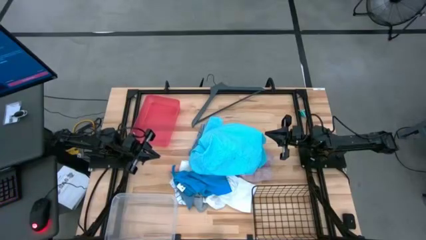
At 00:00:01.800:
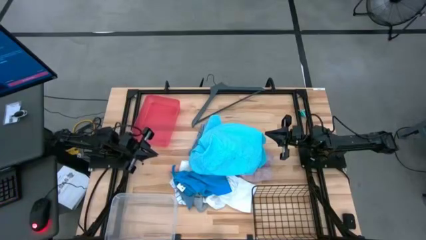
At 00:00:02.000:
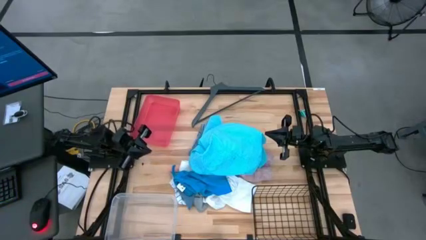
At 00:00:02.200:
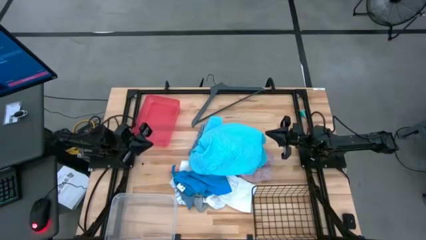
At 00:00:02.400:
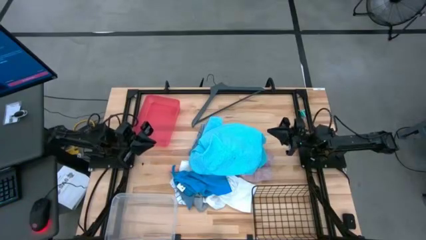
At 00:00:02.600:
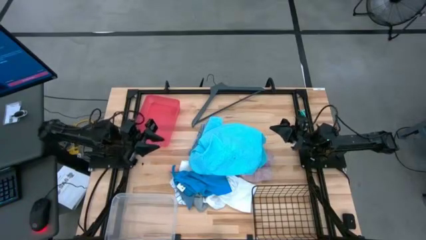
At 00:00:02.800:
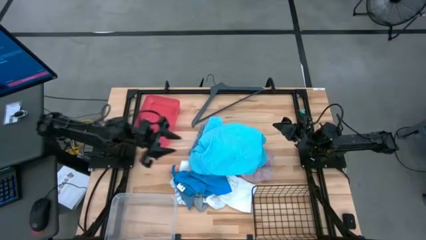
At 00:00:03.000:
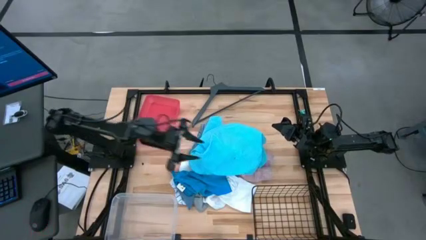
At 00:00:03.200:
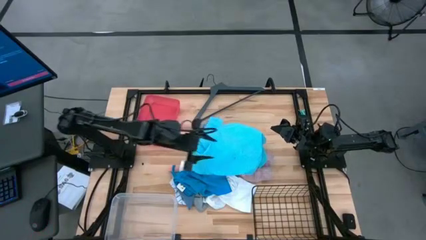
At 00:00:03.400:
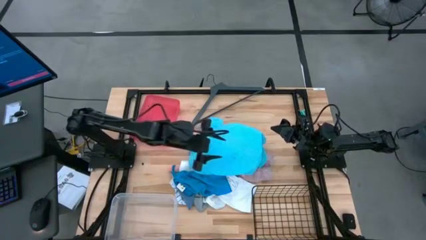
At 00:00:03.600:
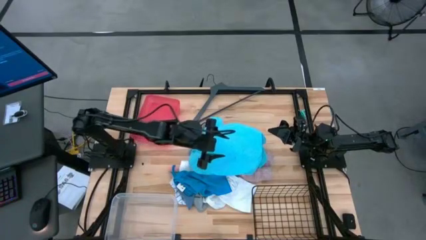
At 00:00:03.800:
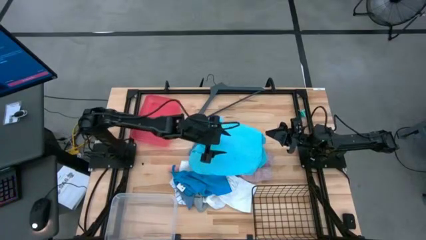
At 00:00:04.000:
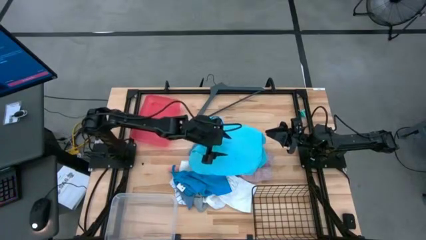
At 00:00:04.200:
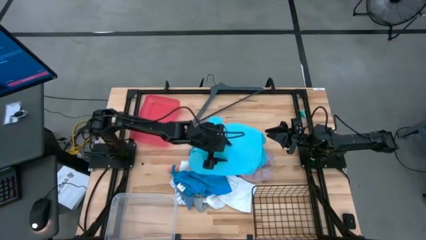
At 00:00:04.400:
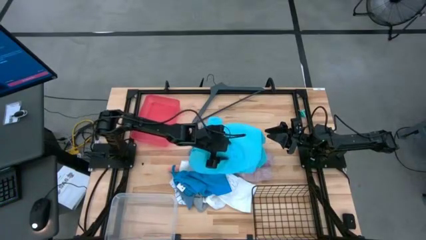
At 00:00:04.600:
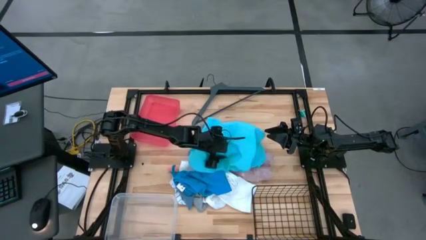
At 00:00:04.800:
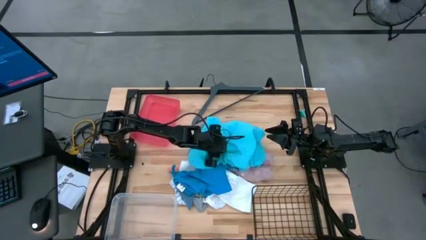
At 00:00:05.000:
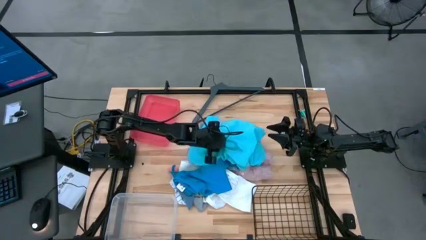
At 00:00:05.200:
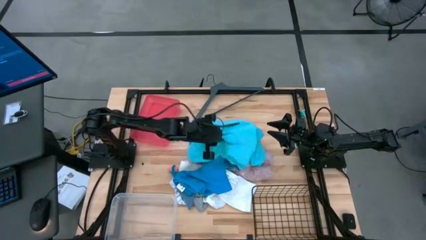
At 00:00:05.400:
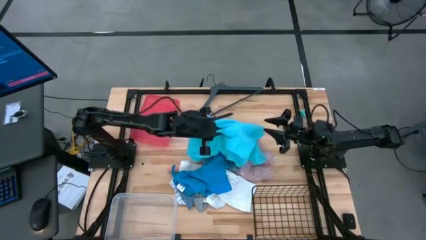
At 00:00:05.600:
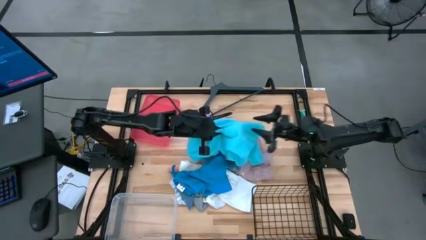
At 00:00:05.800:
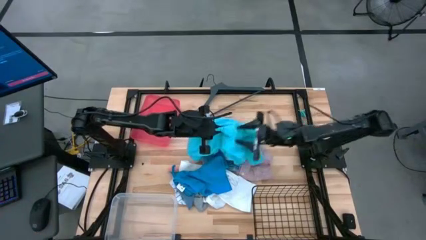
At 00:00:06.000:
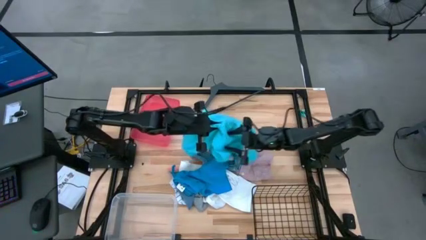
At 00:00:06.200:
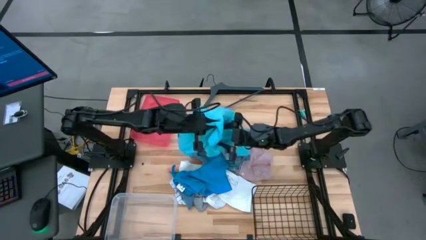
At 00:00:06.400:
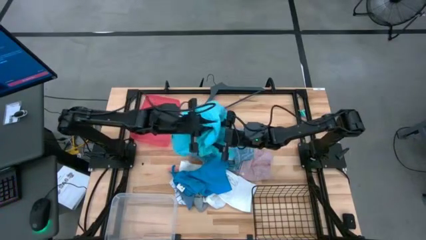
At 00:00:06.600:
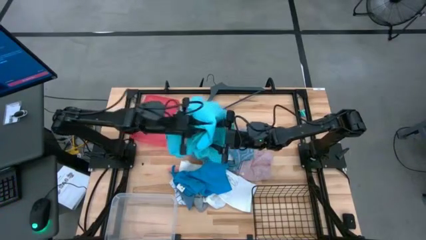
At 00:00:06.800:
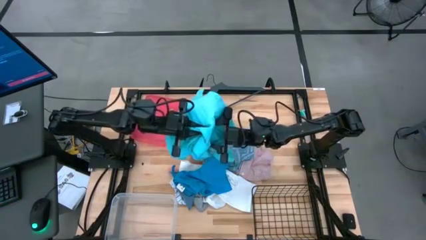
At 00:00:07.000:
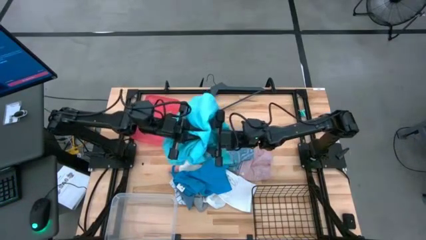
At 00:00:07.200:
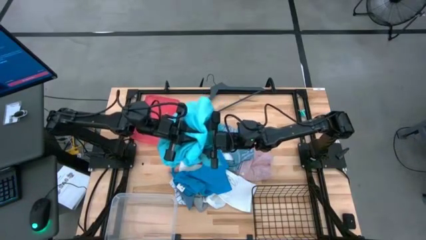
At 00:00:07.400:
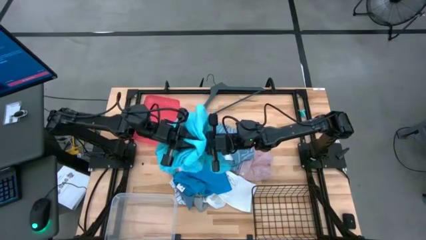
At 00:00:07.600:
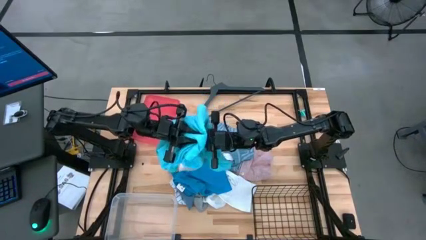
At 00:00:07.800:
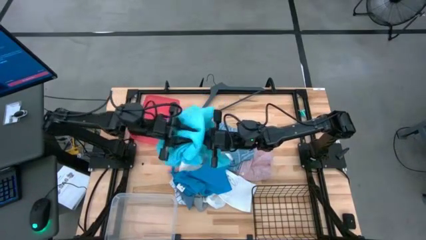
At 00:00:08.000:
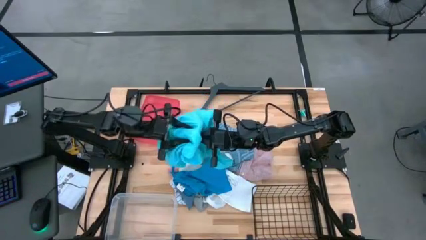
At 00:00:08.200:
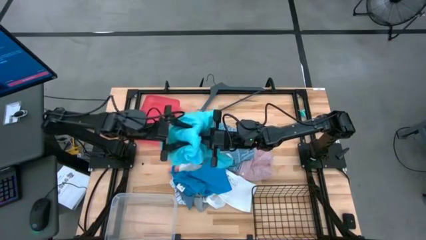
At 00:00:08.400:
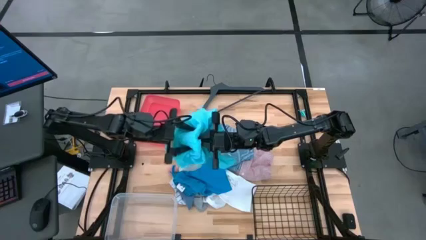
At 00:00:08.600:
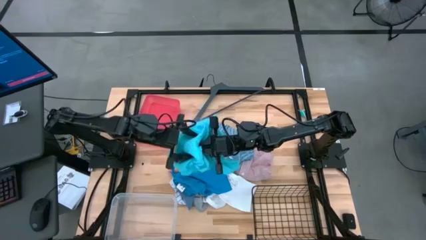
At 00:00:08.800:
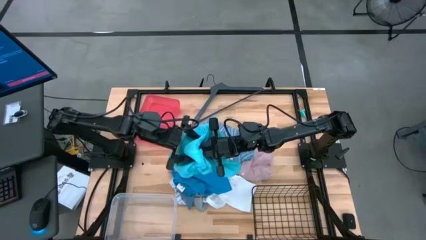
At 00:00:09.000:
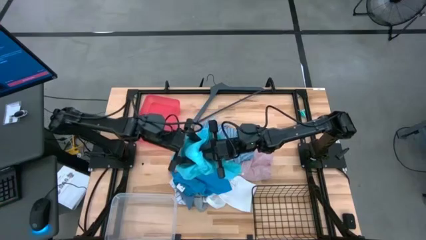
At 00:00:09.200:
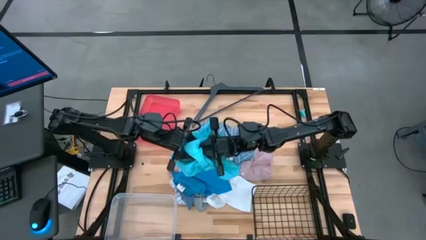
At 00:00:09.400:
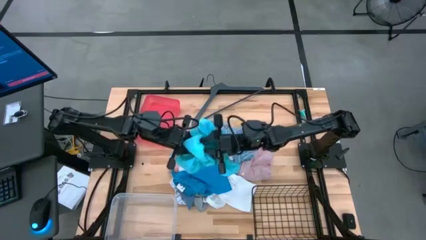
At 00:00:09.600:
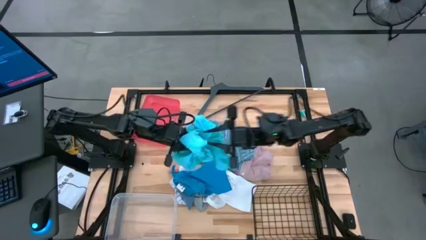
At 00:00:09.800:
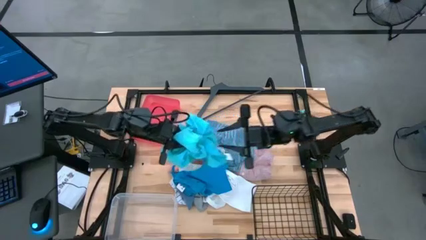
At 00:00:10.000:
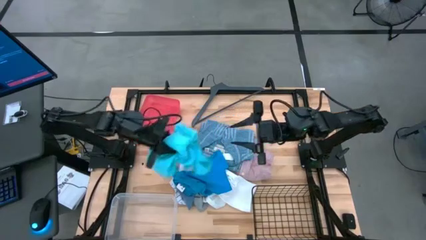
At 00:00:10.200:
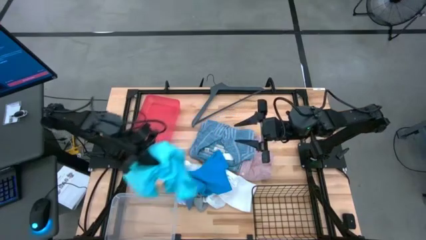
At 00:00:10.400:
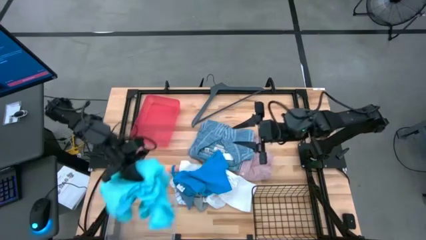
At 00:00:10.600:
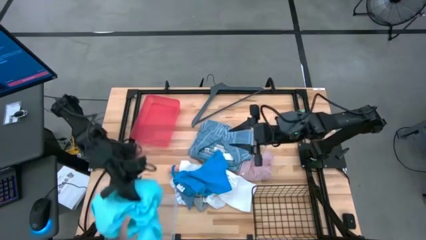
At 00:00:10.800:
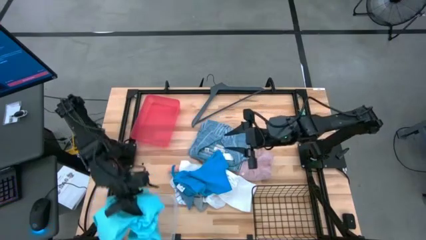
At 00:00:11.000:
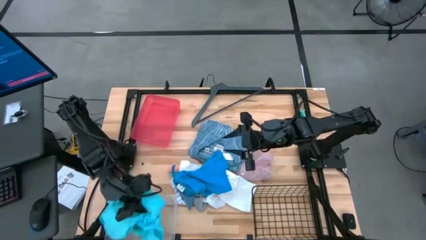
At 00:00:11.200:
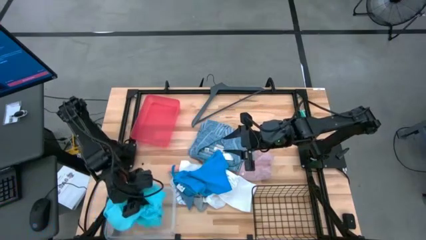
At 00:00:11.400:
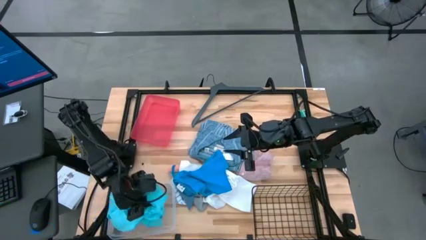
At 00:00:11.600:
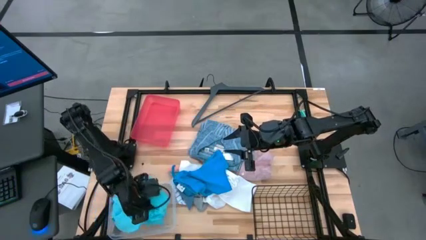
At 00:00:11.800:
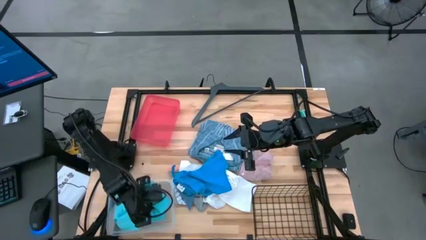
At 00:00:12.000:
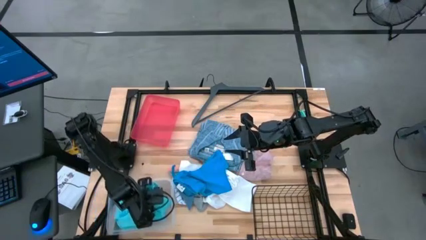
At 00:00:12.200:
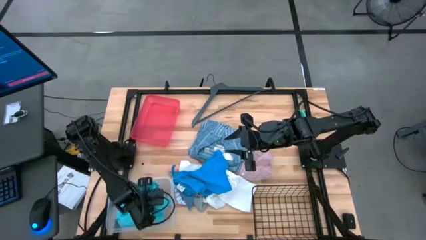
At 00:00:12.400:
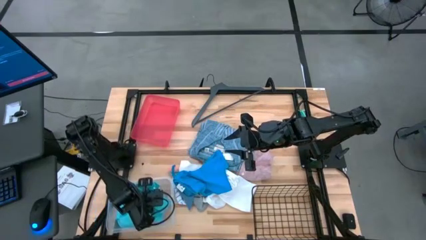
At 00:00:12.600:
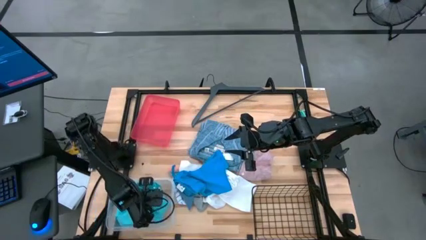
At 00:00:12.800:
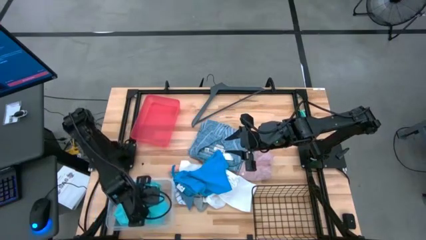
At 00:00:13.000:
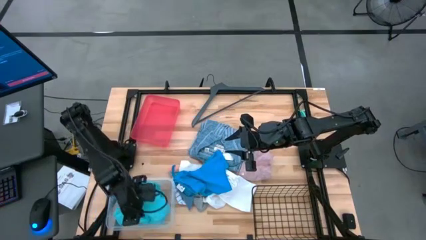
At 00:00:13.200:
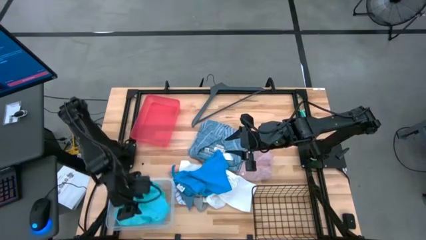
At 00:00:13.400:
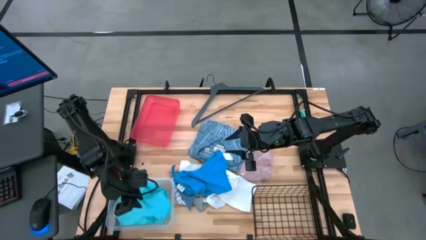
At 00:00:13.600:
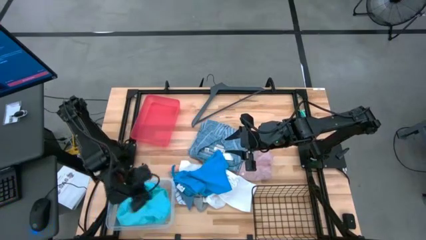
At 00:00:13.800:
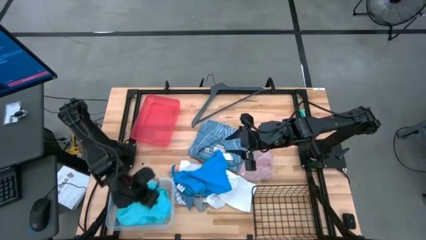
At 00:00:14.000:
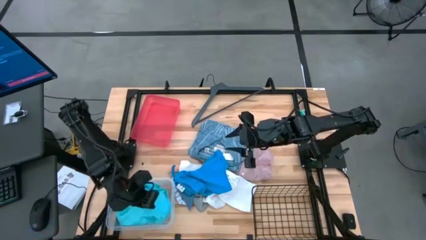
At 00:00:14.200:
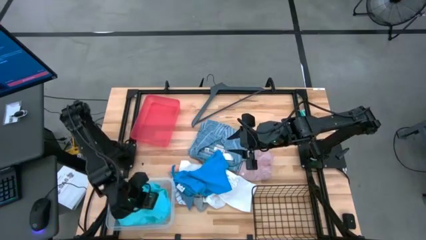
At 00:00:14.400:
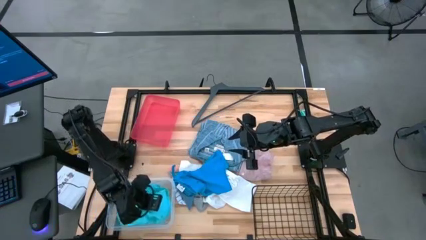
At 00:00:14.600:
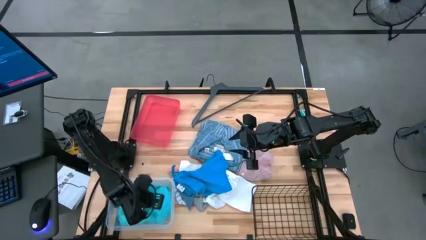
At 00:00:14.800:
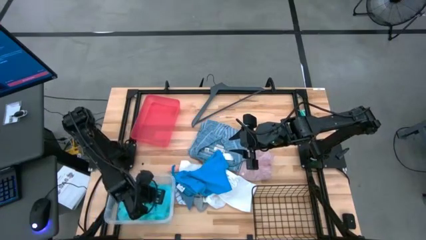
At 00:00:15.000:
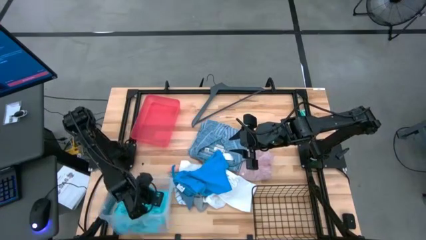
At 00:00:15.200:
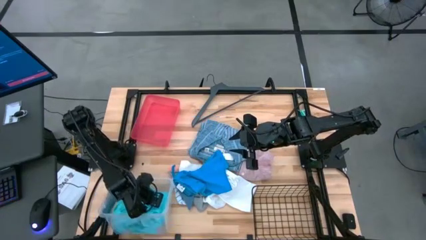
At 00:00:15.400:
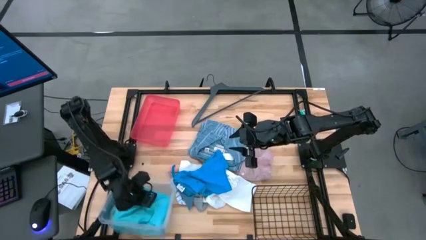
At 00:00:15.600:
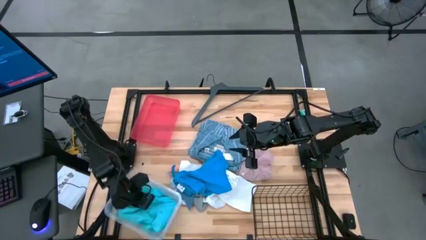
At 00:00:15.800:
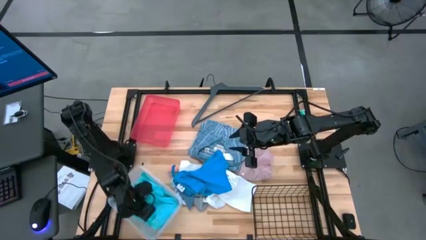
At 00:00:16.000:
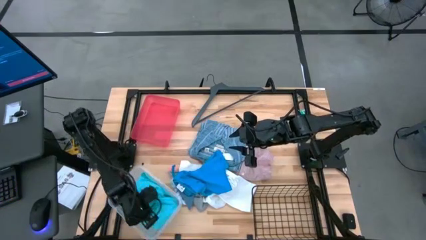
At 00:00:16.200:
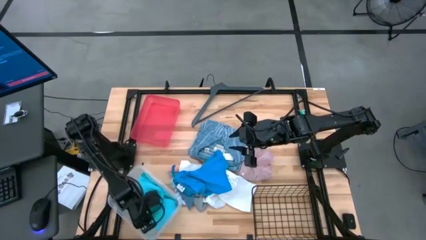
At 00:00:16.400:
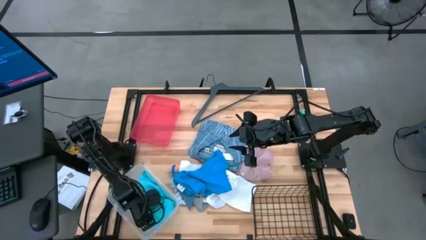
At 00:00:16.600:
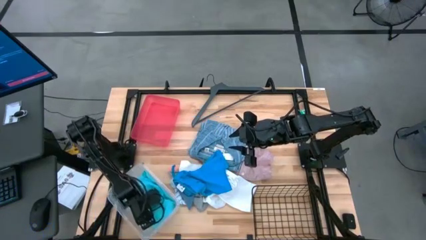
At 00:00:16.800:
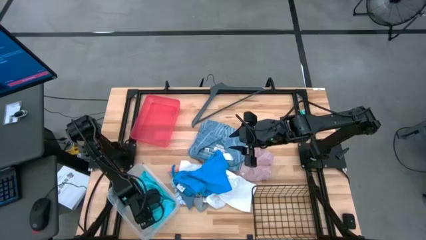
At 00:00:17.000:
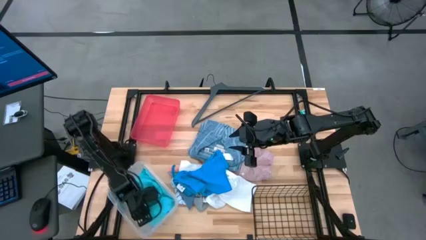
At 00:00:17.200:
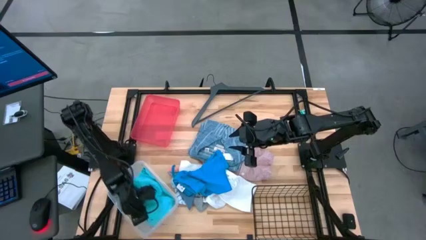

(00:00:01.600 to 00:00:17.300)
Task: Pick & Place Cloths
Put the light blue shorts into the transparent bin
